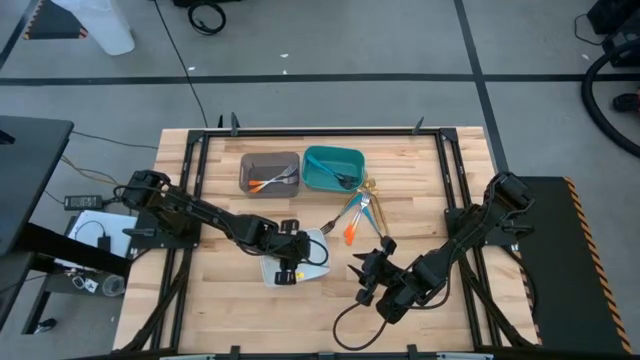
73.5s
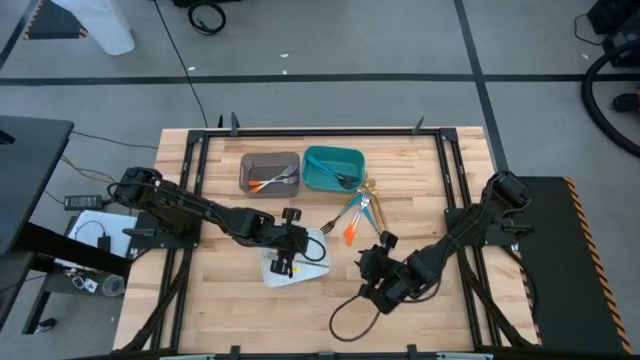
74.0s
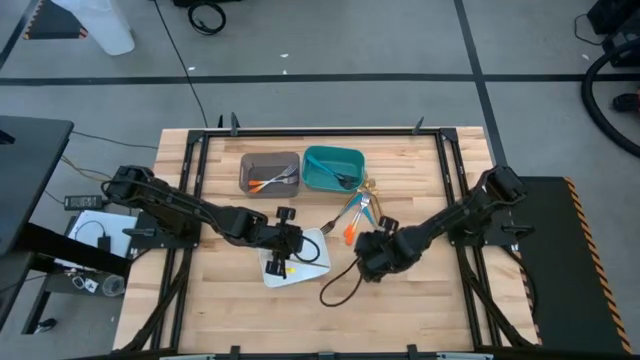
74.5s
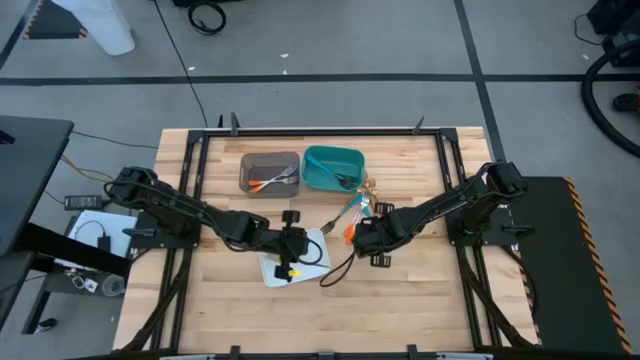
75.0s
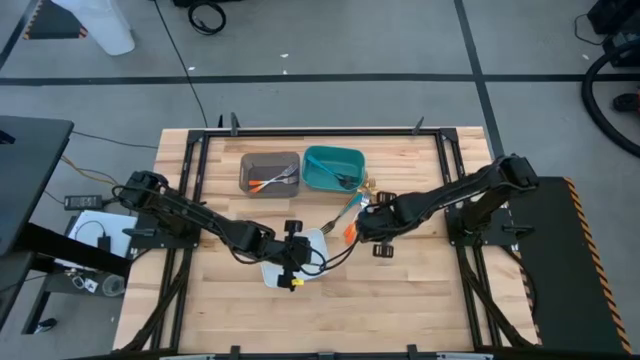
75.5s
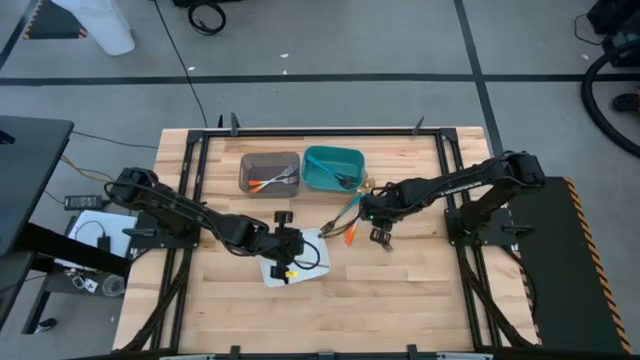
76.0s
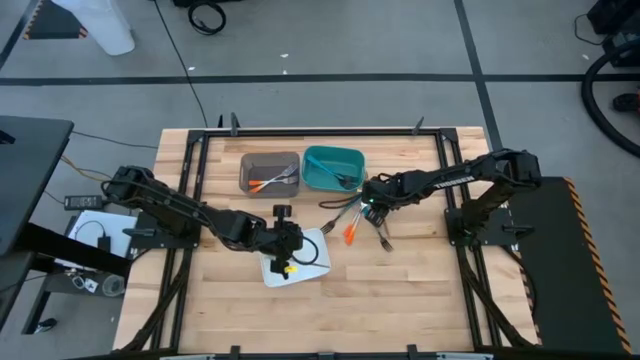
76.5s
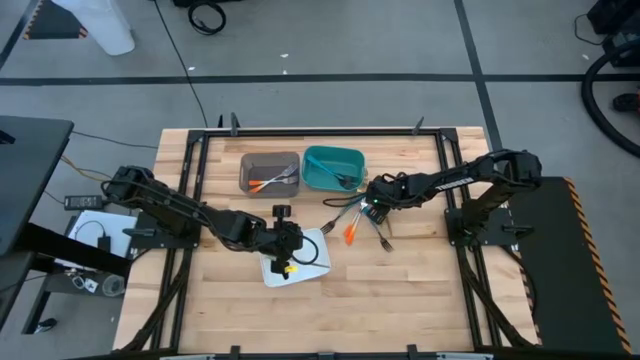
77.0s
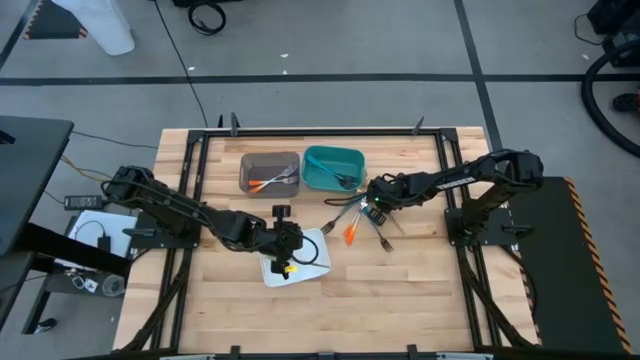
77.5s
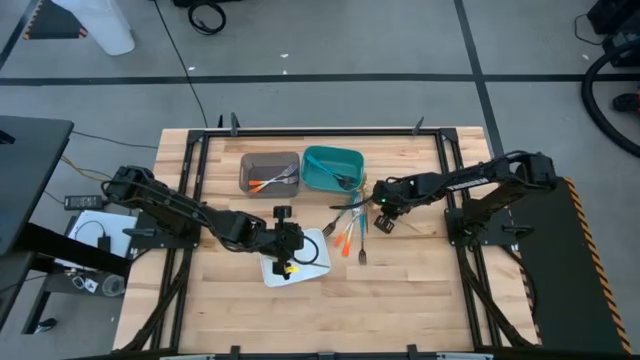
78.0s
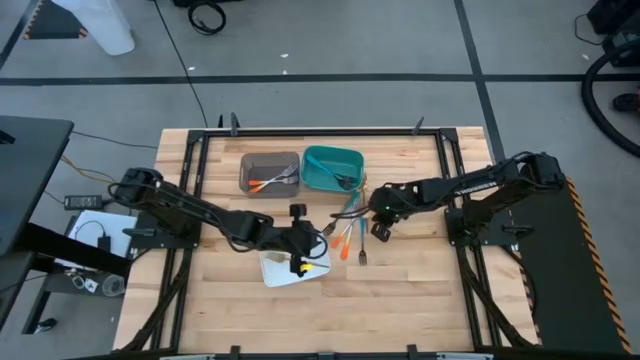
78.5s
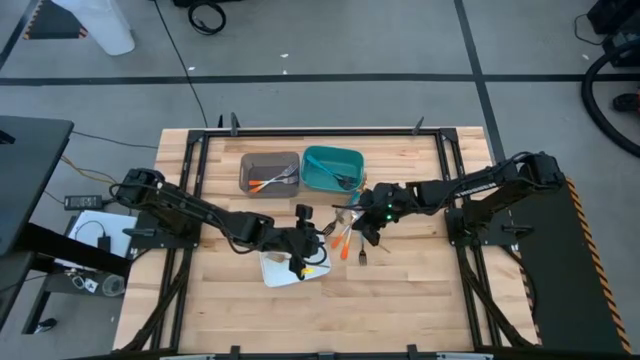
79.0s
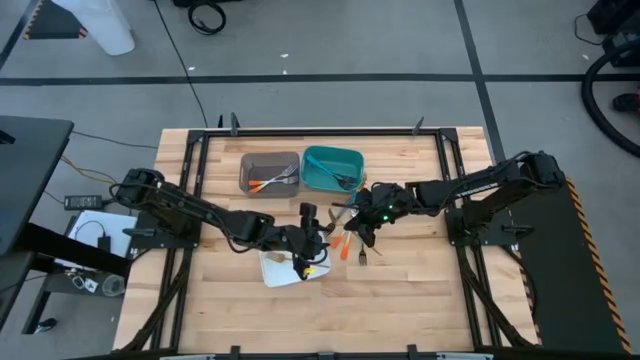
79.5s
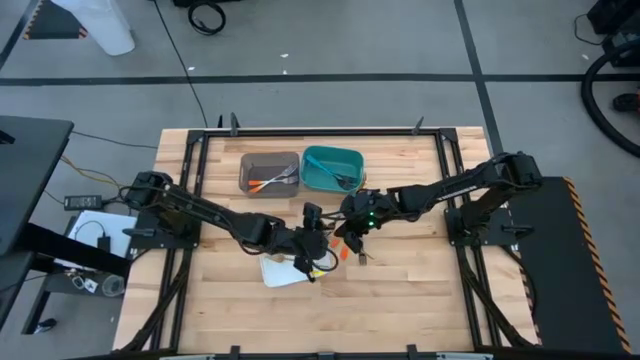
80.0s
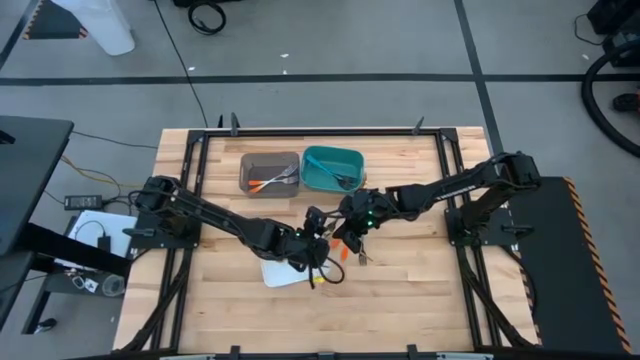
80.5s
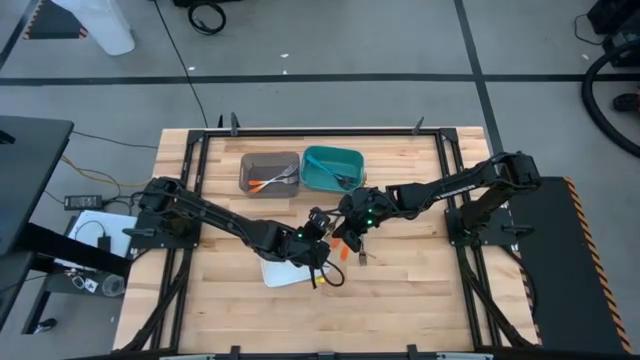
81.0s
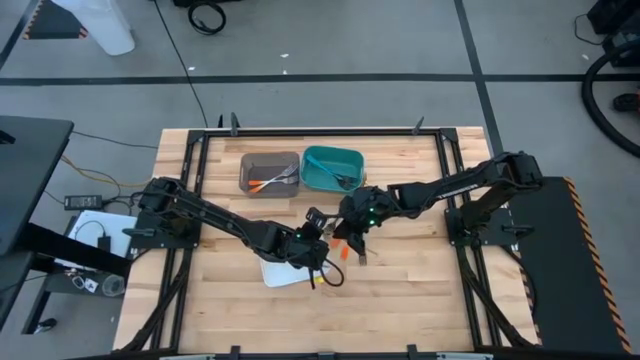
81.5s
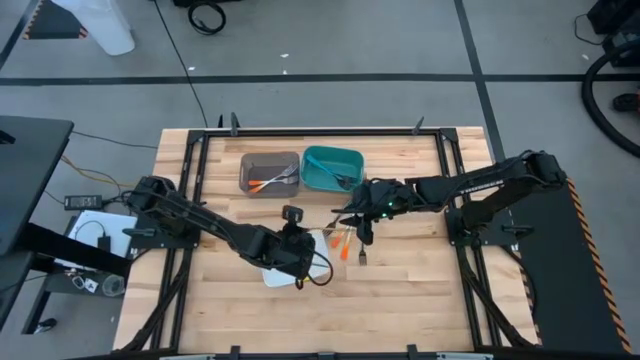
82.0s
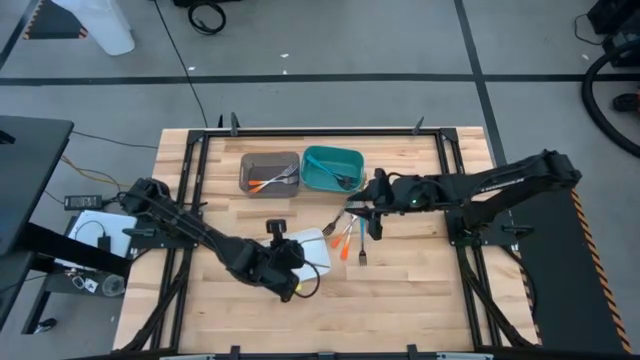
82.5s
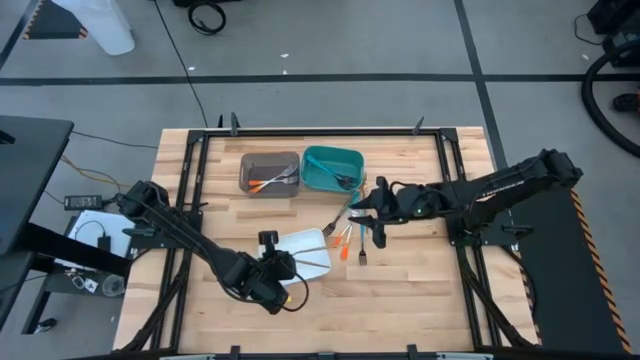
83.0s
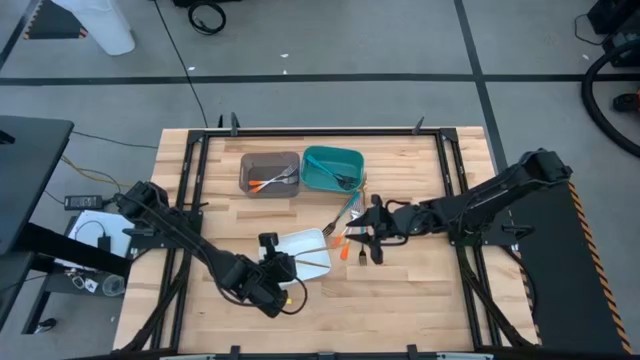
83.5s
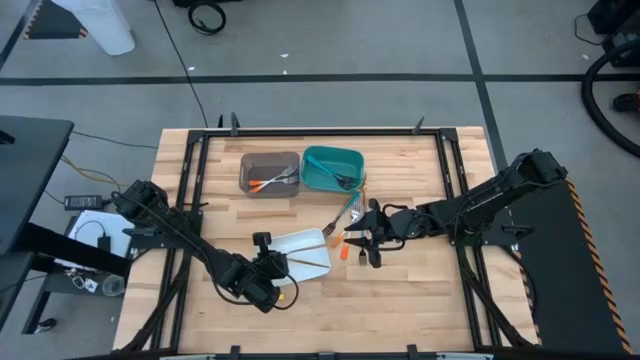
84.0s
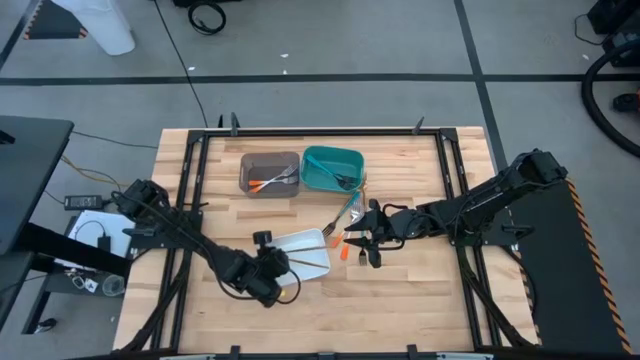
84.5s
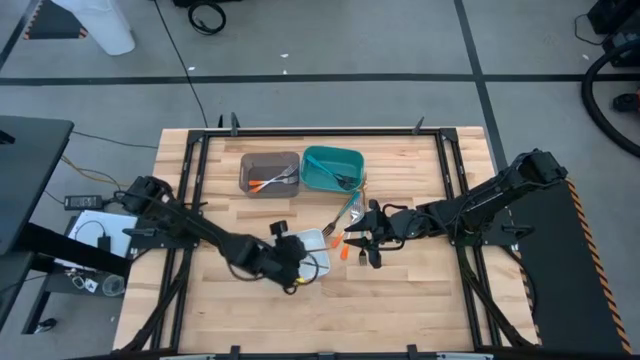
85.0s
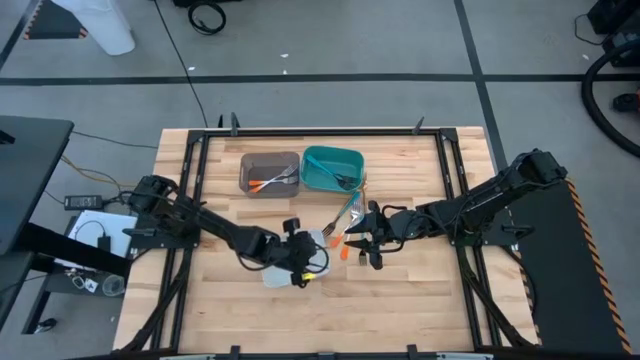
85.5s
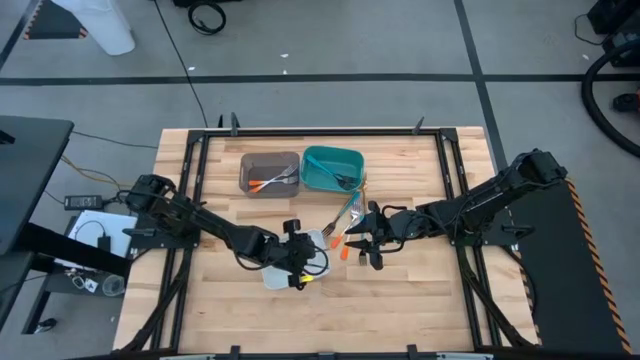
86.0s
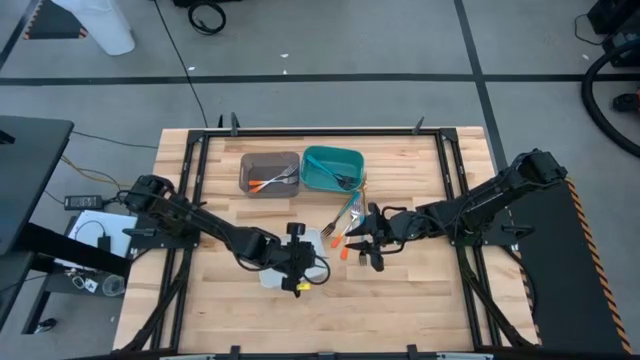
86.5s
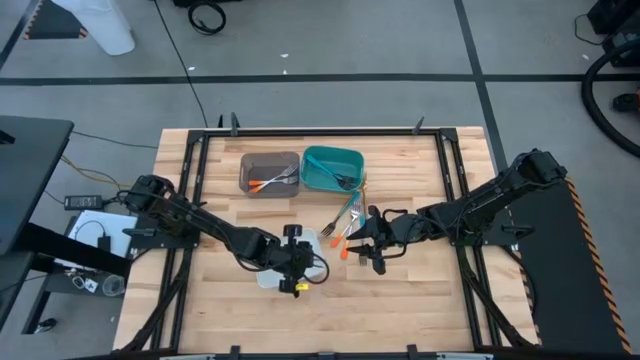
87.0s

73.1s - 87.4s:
Task: Sort silverware by color (type)
Put the gold fork into the white bin

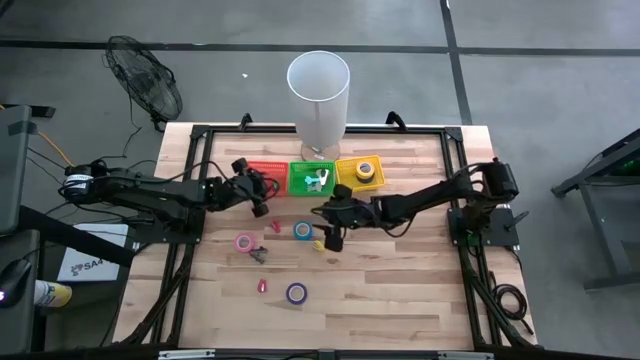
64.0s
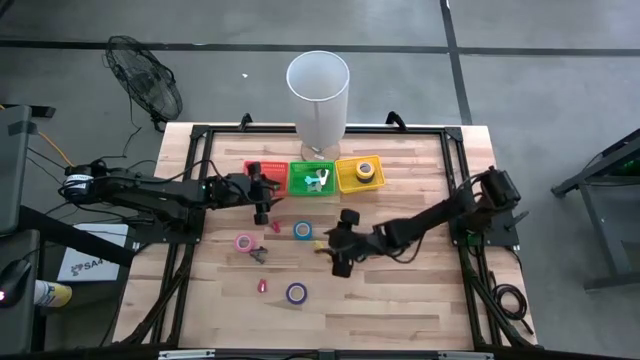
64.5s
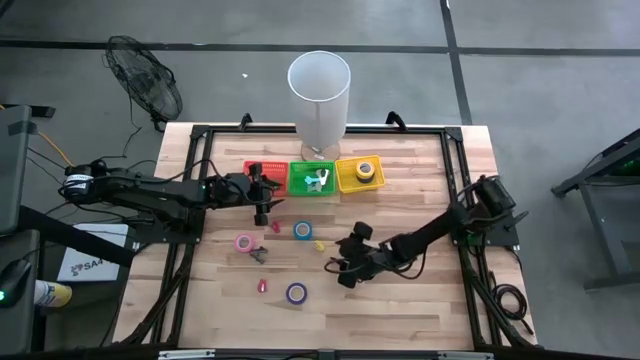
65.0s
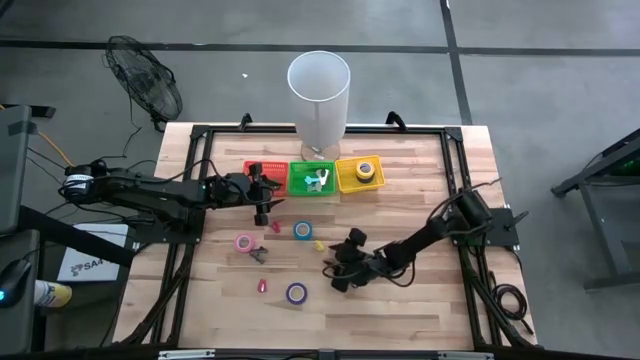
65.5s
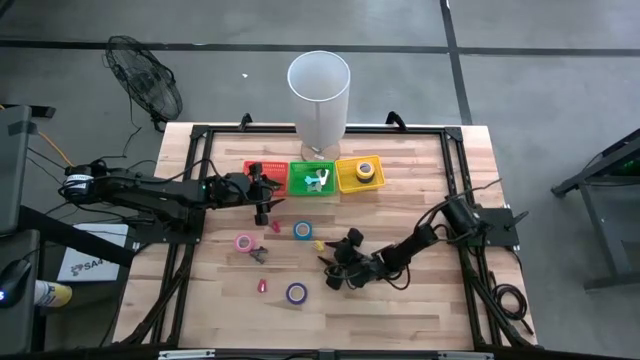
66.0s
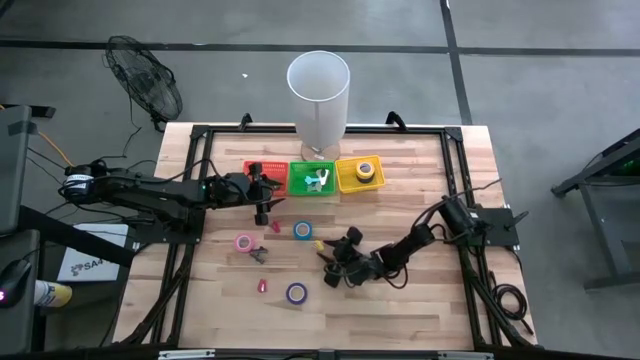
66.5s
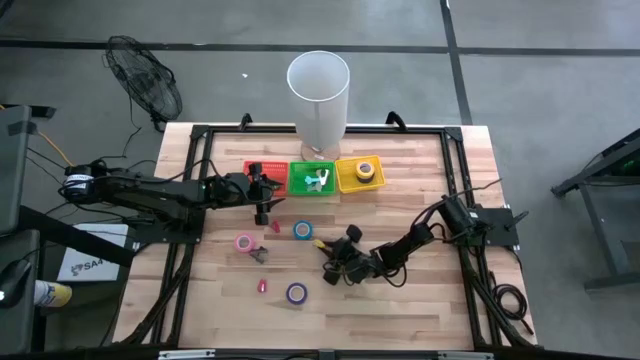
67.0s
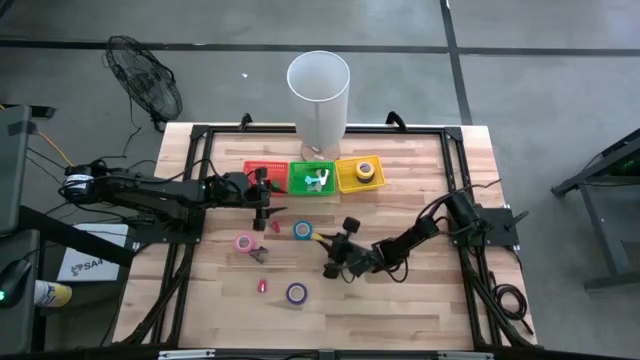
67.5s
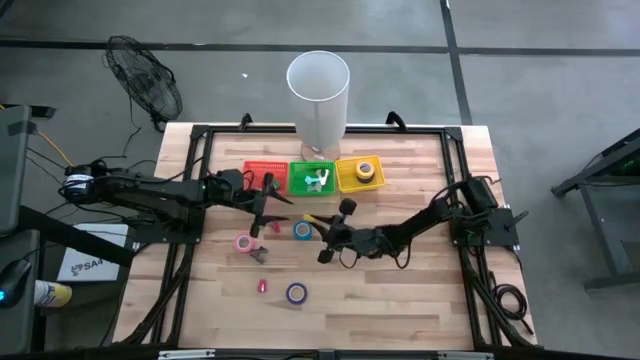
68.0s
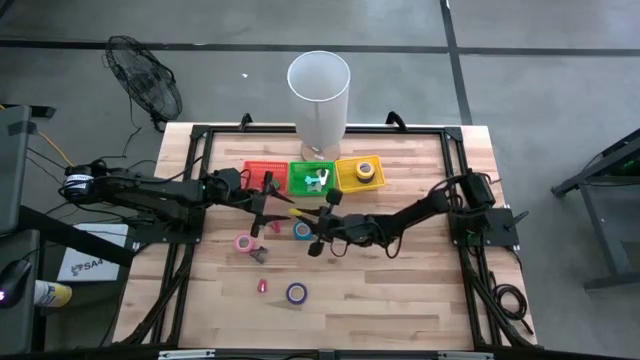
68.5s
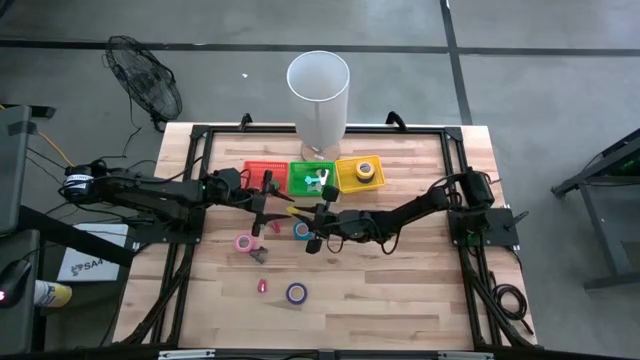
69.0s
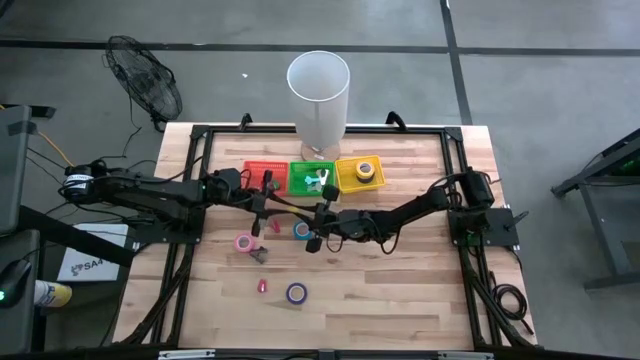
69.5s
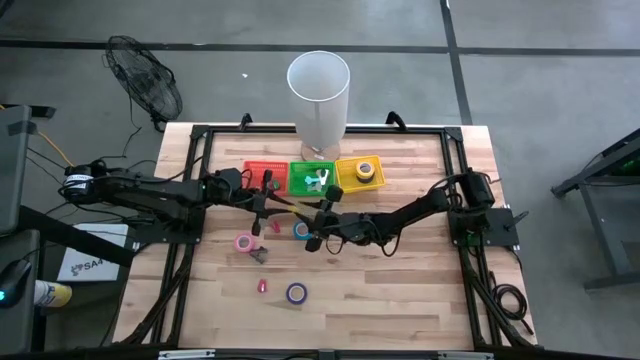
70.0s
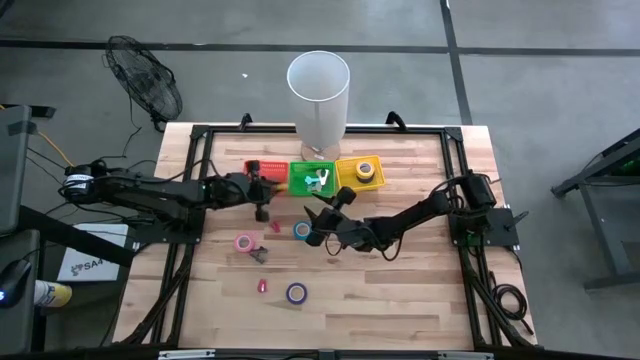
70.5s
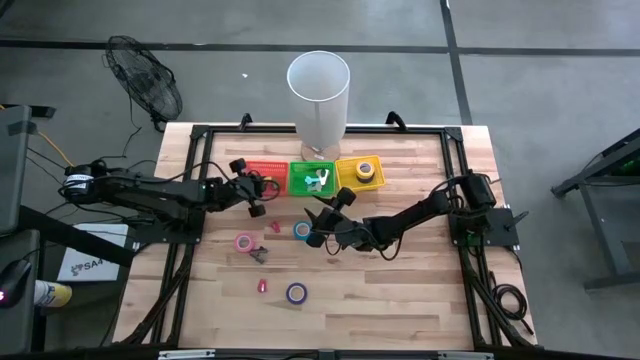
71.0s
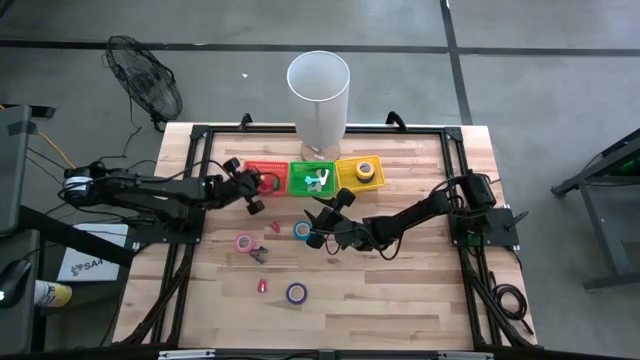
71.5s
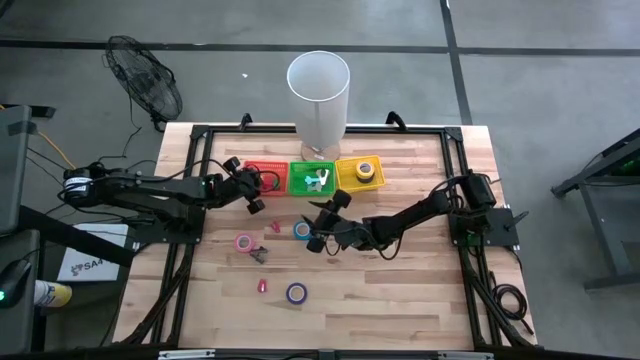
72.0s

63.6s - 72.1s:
Task: Pick and place Stapler, Stapler remover, tape
Put the yellow stapler into the orange bin
